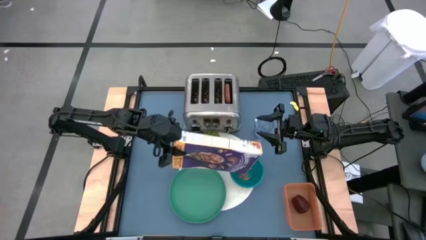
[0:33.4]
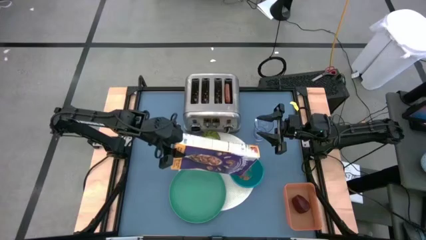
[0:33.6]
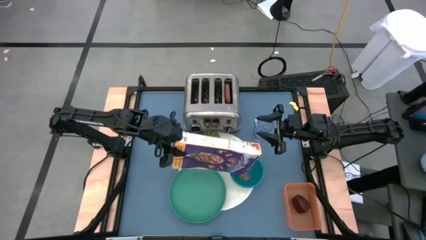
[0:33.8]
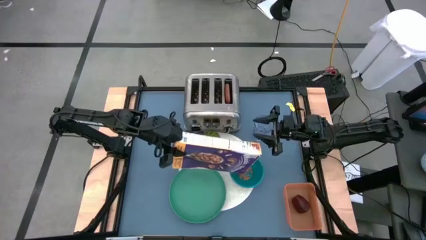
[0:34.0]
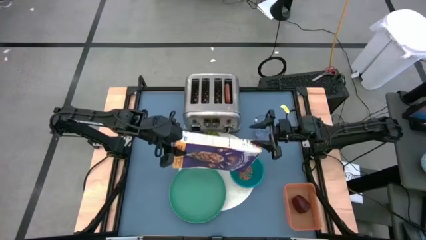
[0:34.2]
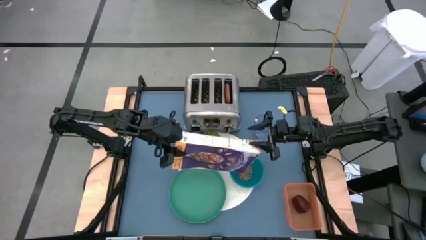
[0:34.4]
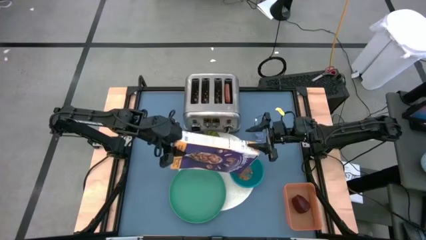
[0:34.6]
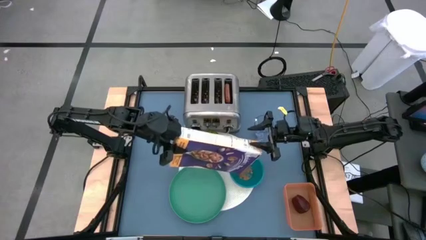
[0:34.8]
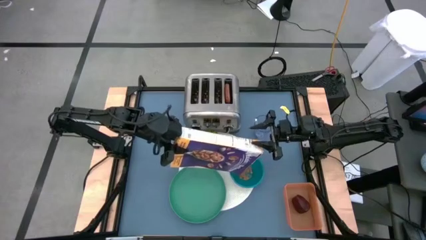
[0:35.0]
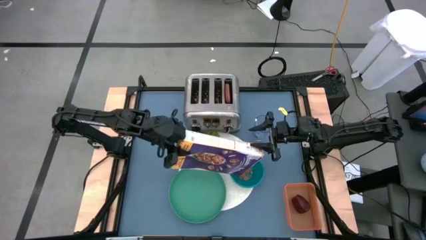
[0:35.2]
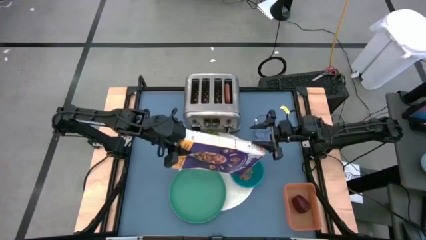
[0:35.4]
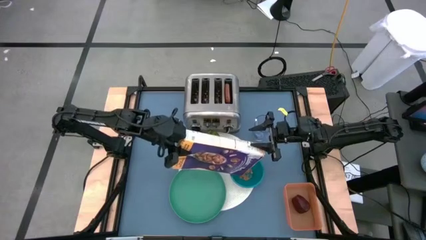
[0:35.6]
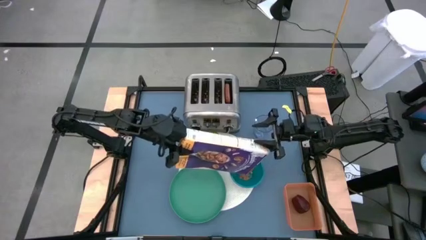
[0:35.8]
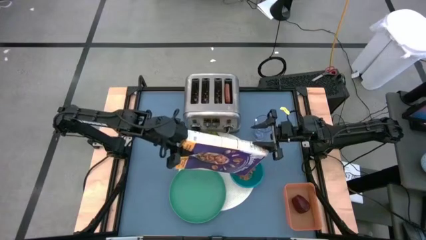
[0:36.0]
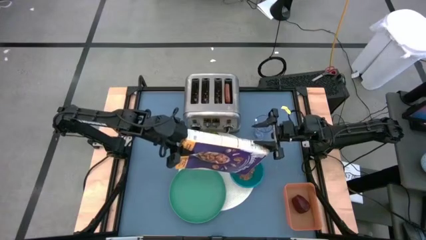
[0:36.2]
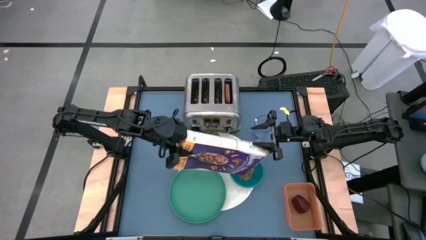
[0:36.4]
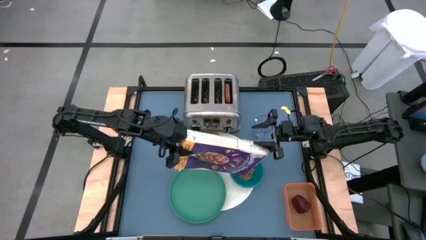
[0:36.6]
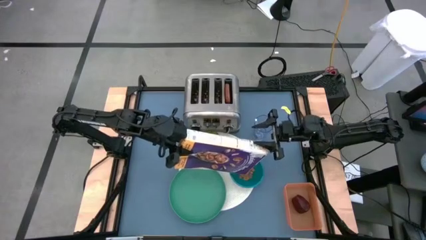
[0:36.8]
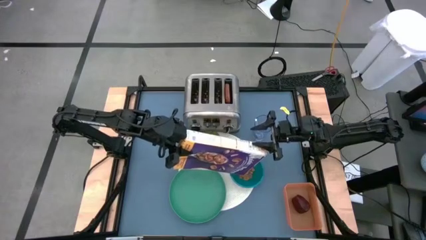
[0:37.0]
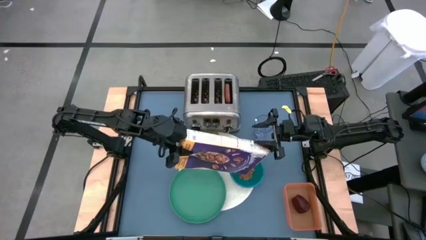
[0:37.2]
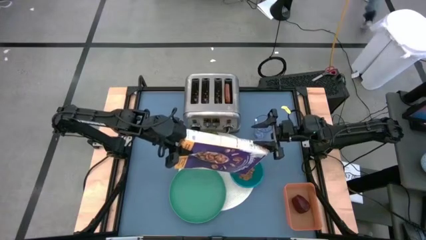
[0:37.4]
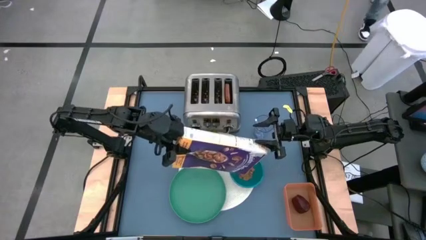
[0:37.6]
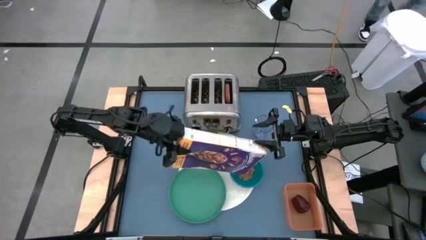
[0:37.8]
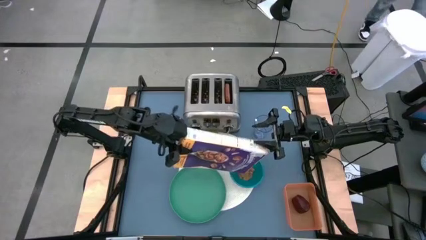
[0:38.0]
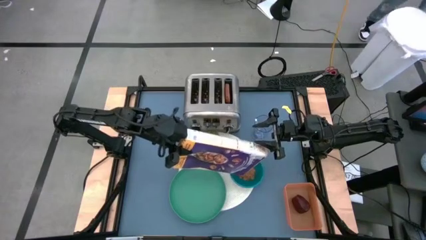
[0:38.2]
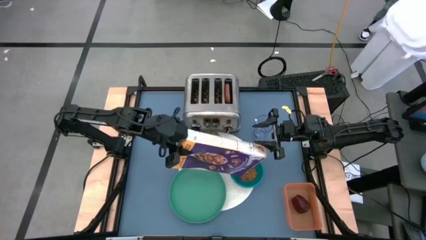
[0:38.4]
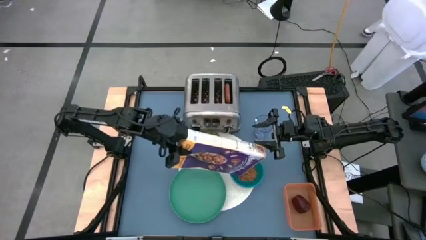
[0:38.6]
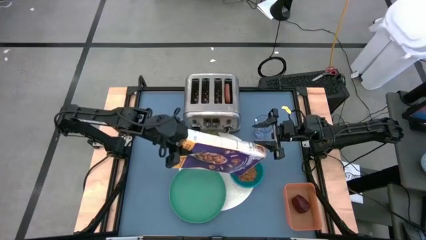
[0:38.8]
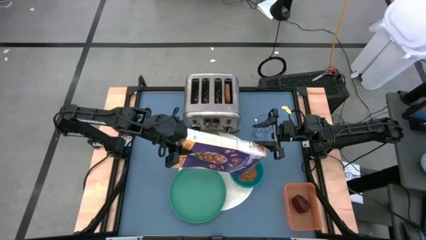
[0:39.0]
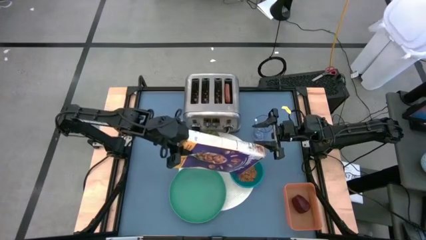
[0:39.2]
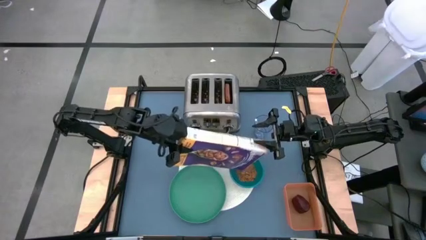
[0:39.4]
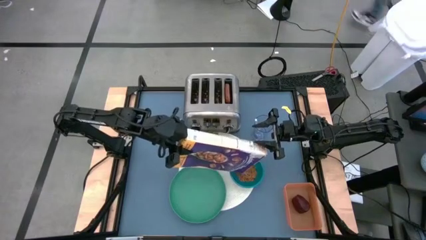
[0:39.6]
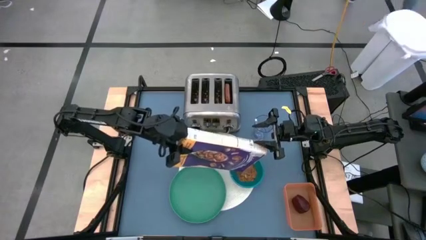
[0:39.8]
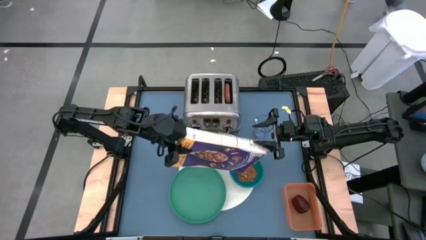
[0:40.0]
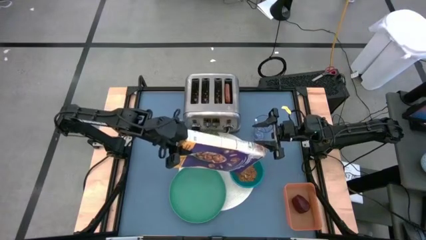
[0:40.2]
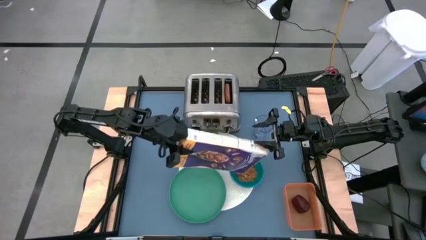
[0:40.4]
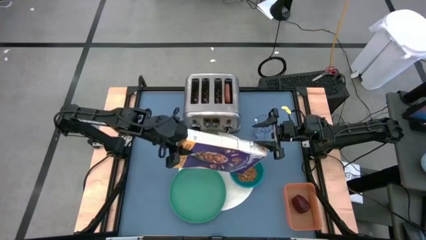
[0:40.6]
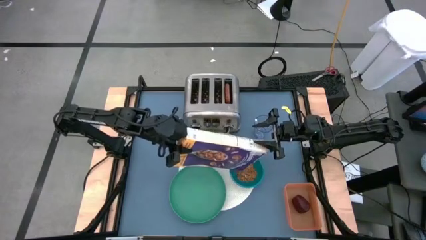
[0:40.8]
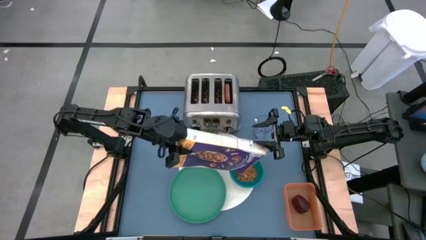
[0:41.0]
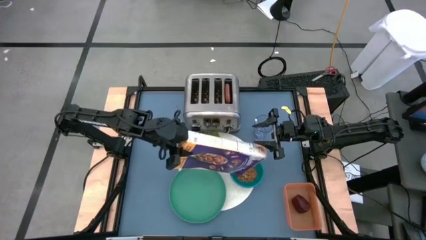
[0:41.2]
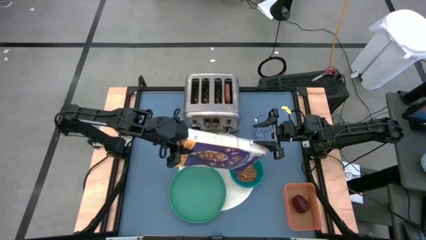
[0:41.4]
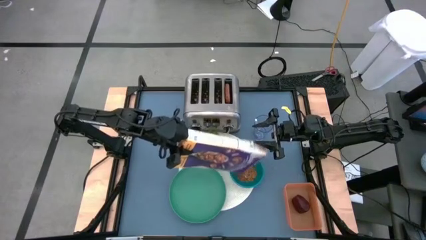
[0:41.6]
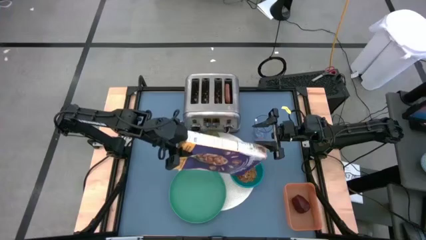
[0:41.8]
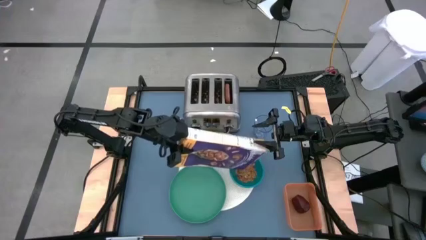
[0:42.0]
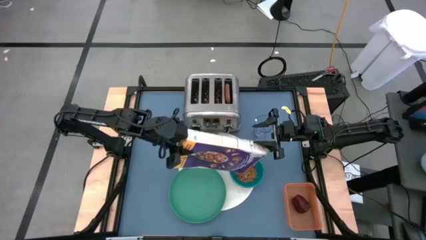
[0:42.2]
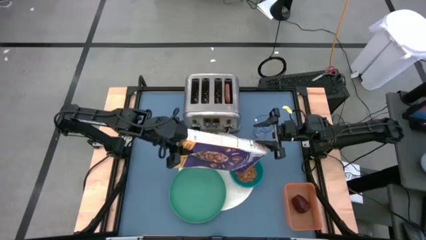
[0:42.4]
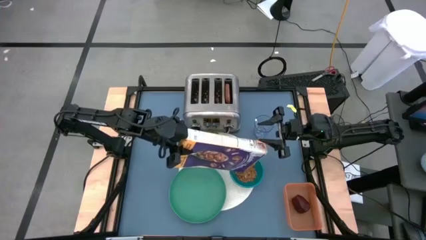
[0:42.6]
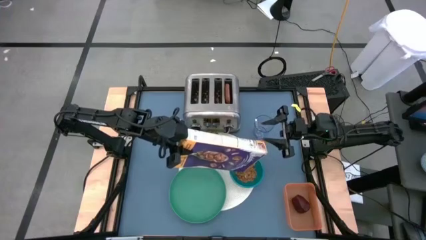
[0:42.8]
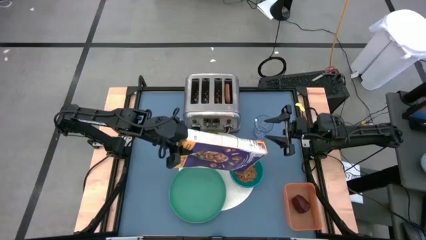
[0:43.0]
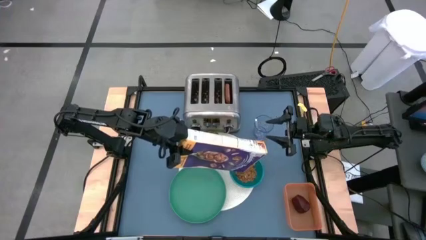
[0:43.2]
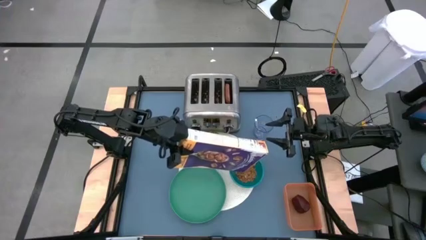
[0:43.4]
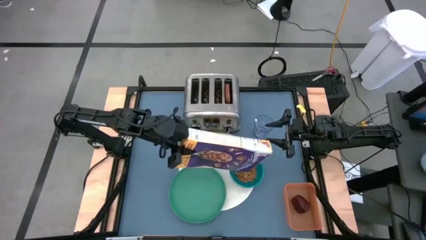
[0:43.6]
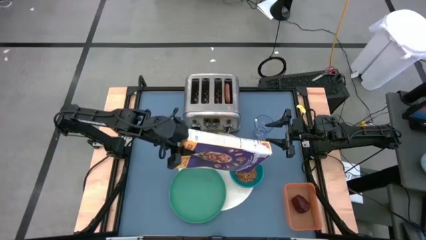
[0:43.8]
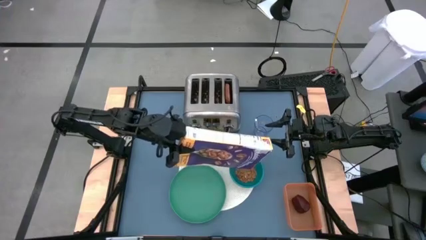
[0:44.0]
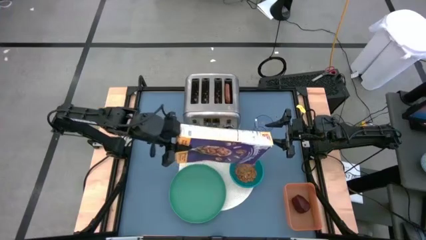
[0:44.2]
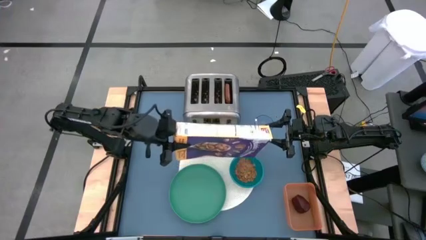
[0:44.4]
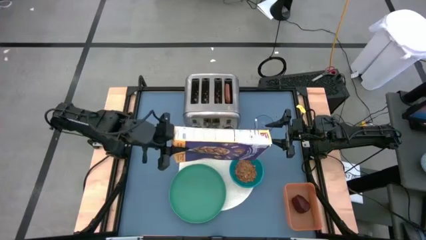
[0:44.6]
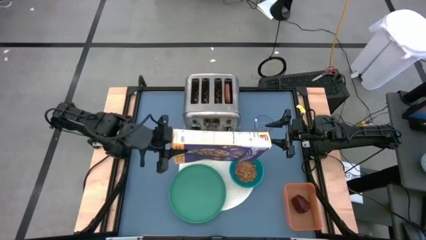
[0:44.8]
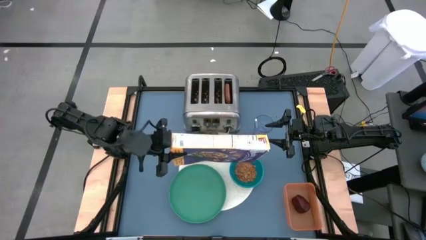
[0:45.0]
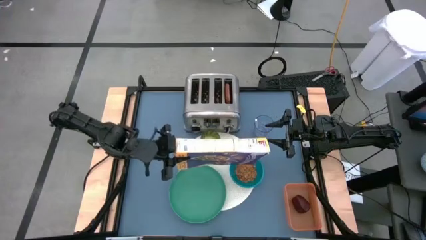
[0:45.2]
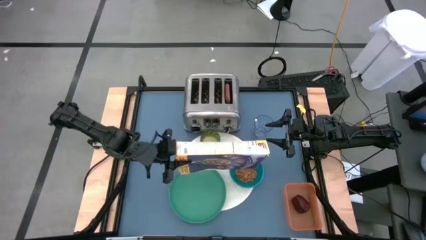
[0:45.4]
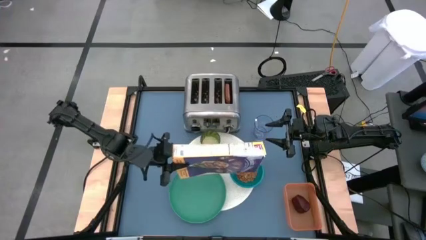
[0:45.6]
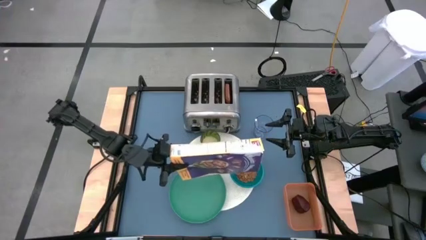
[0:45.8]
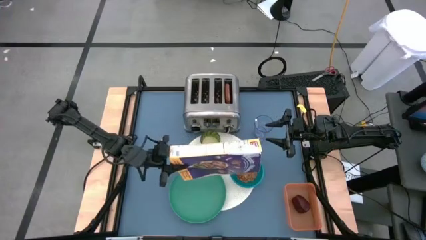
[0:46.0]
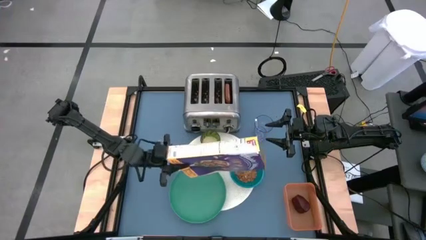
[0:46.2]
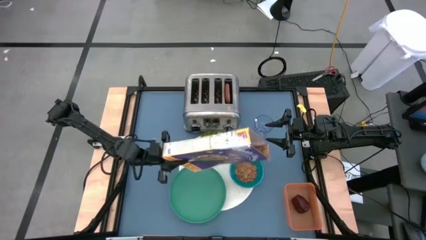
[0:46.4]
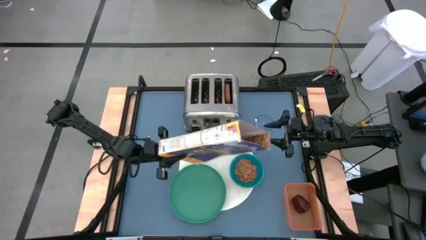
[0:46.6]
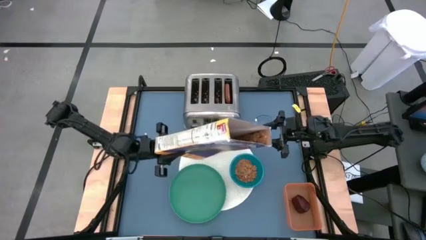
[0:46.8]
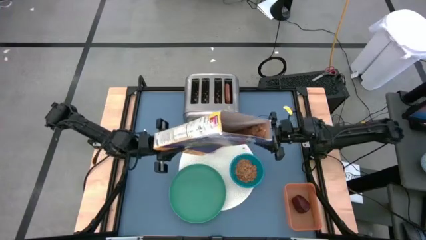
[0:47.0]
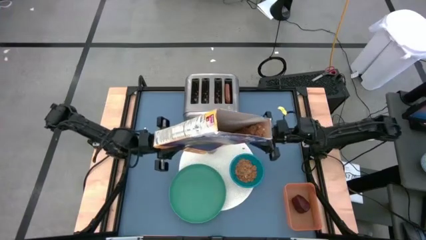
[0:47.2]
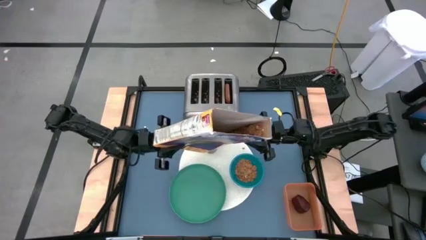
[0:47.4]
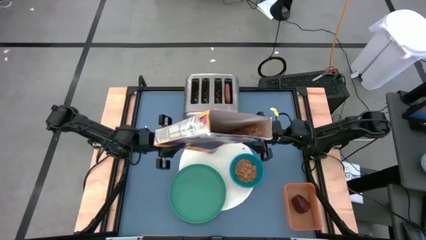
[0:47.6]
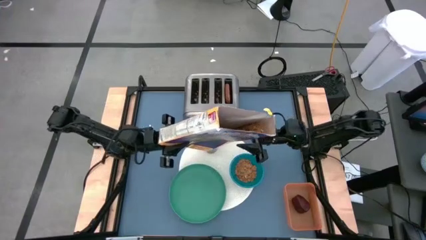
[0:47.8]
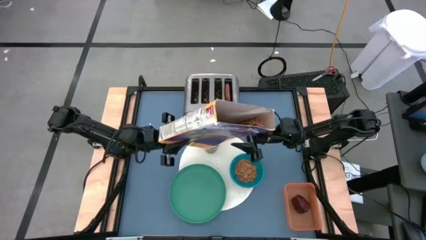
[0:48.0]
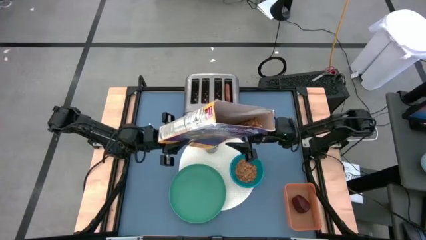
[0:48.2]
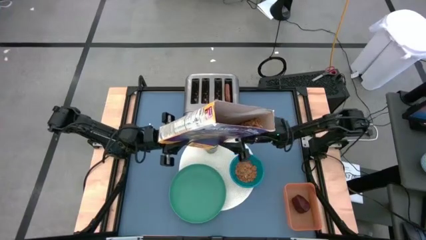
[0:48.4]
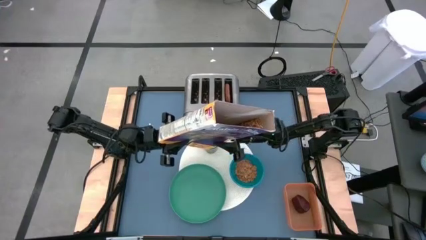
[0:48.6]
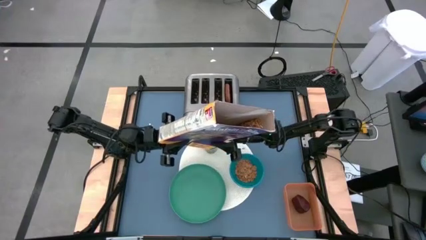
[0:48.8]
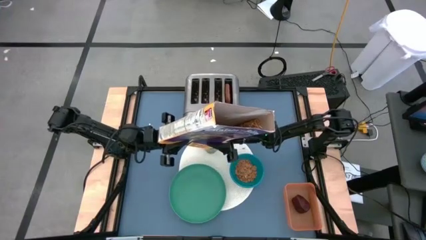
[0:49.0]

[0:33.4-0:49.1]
Task: Arrange a breakfast setting
Pour the cereal into the blue bowl
